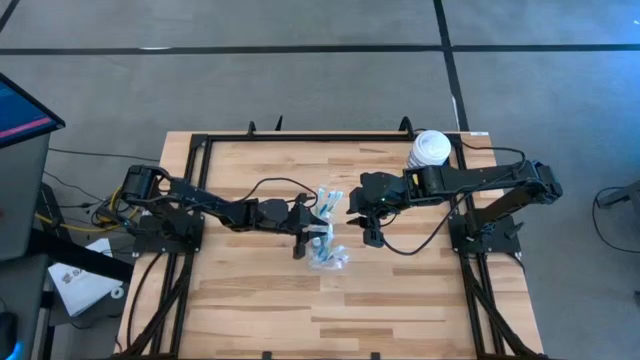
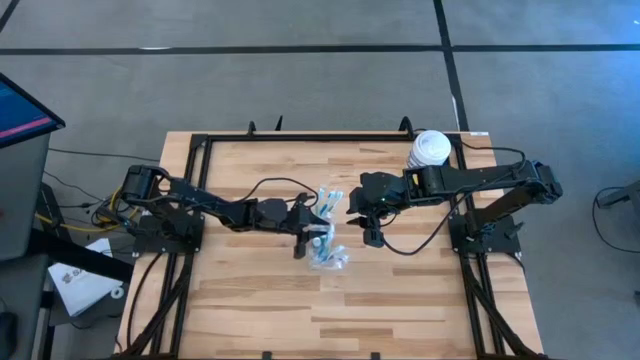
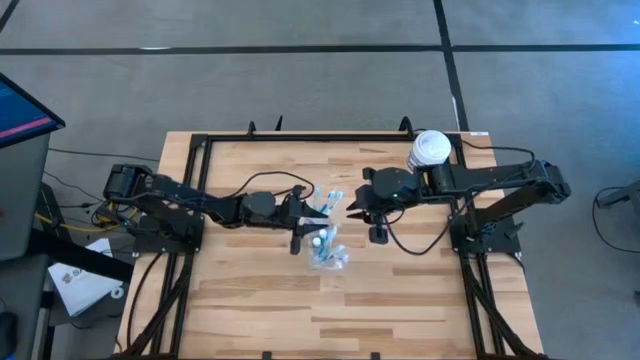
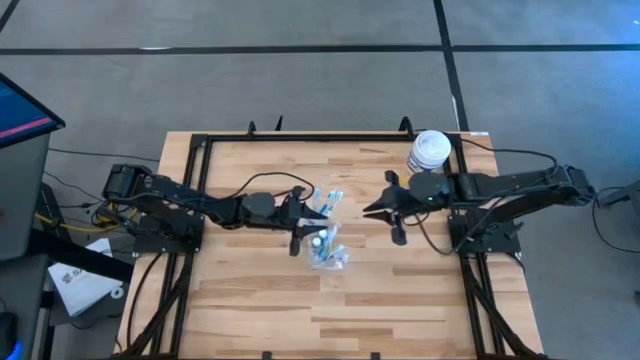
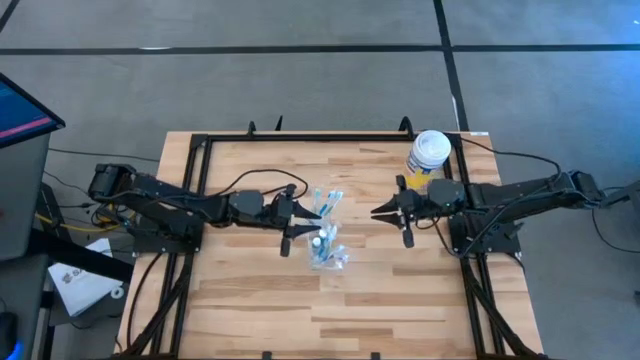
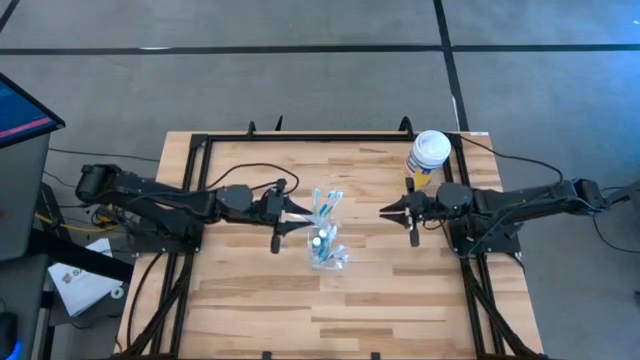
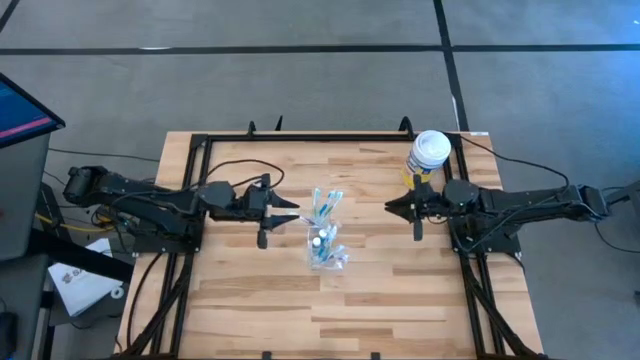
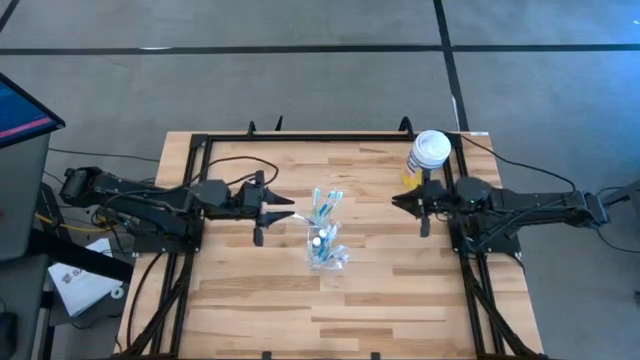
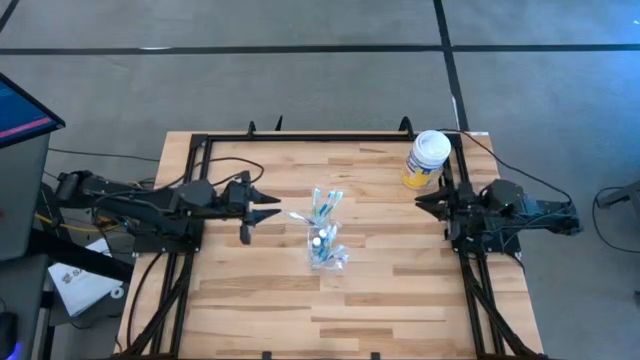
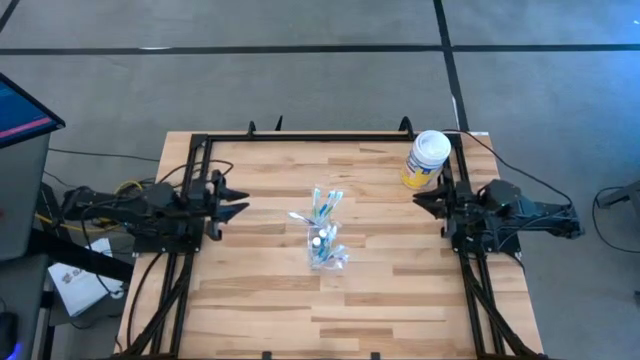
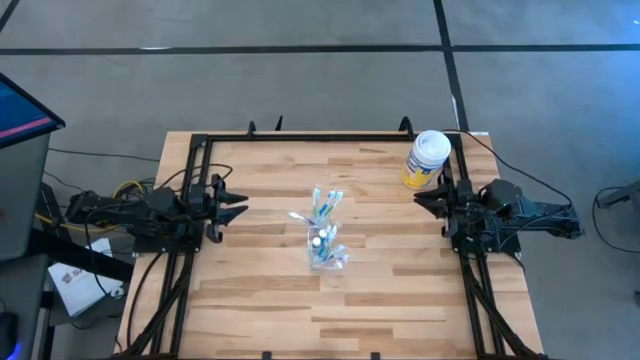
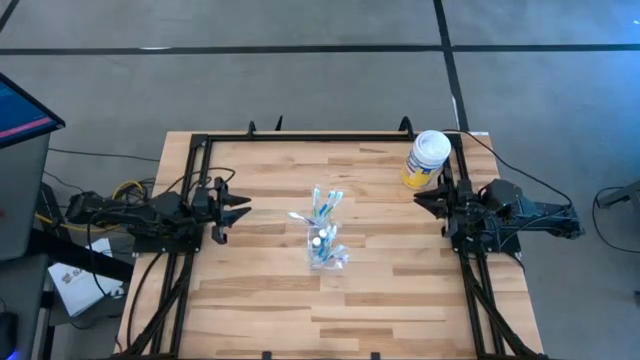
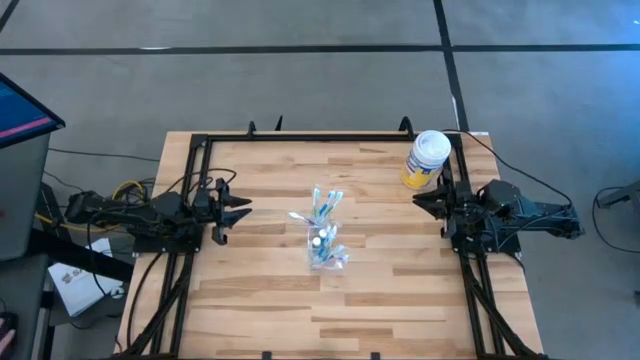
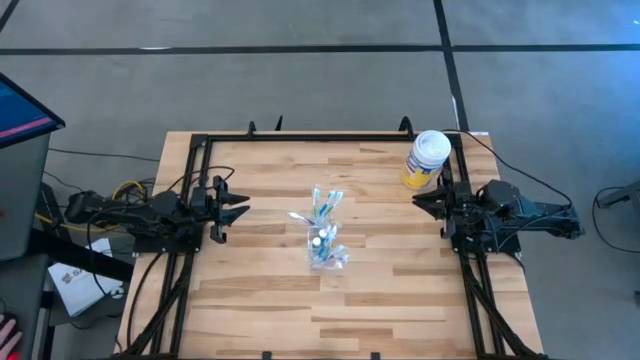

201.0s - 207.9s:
Task: Pick & Place toothbrushing station
Return to Home Position

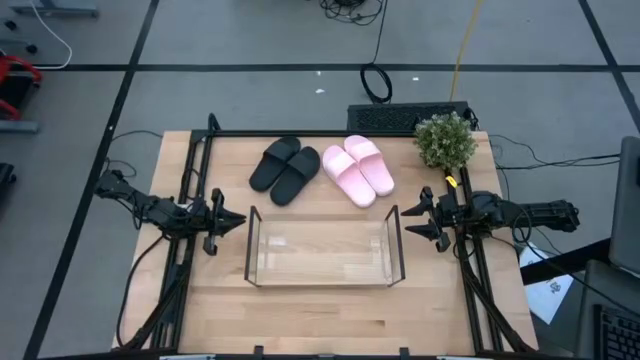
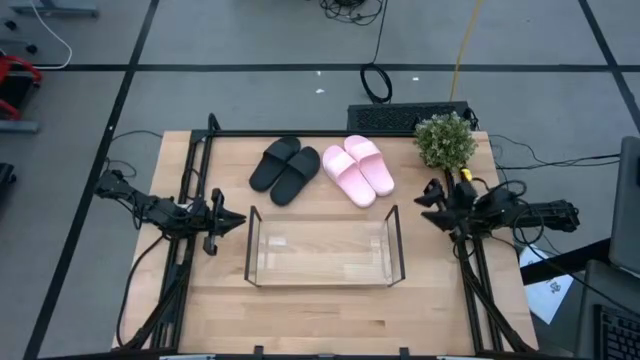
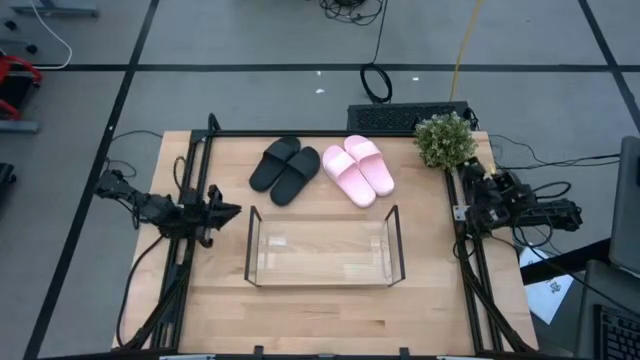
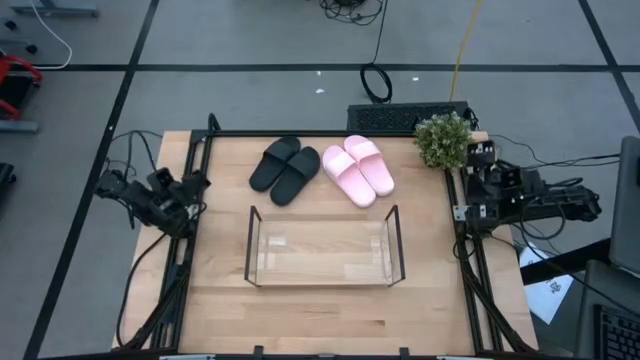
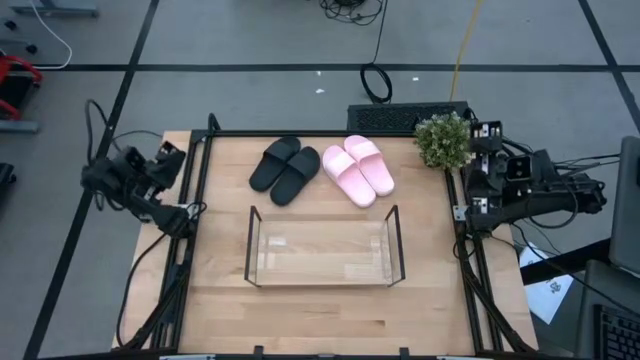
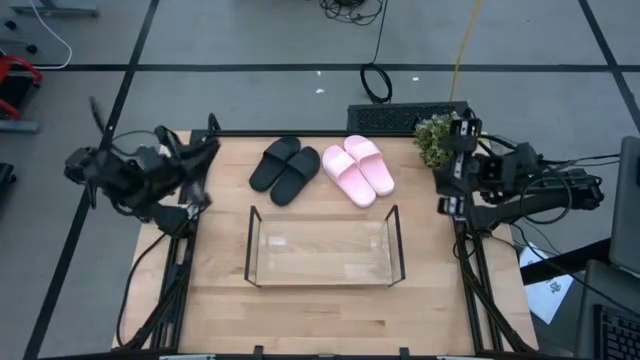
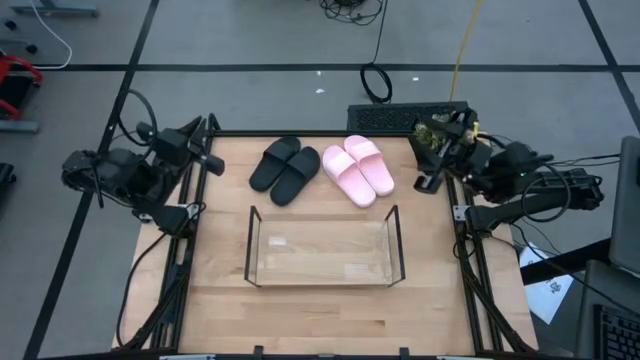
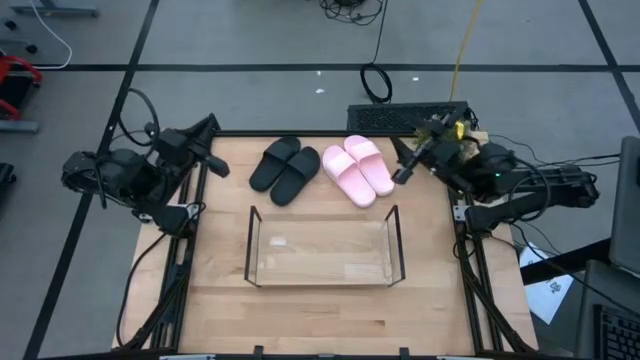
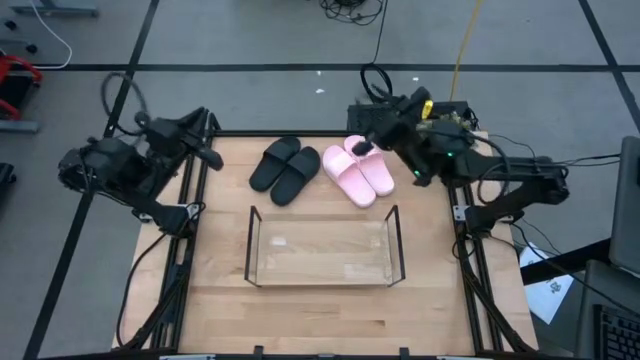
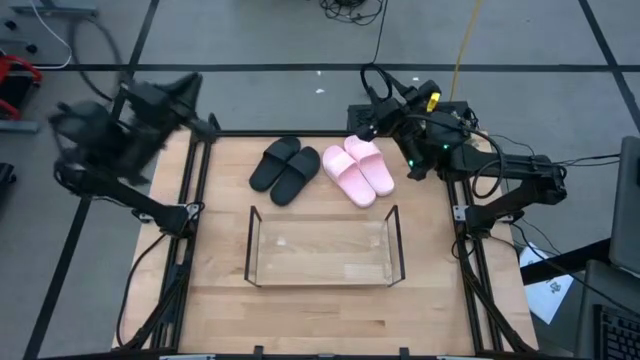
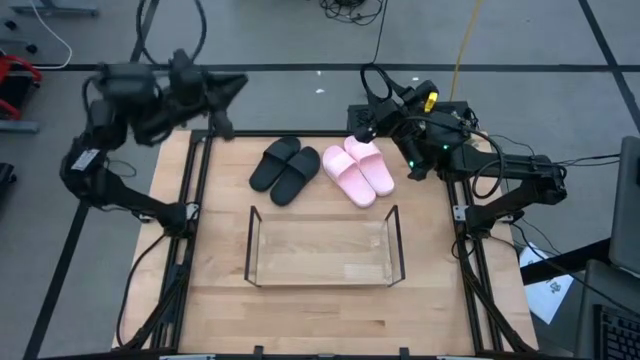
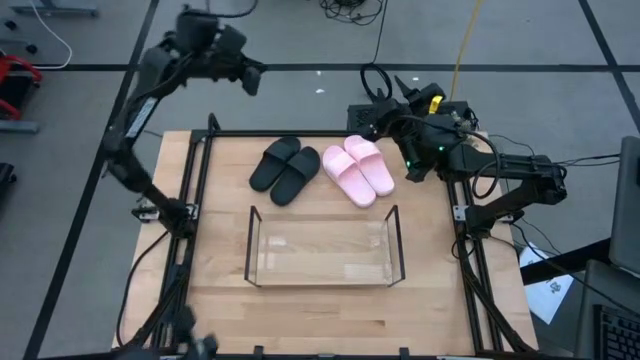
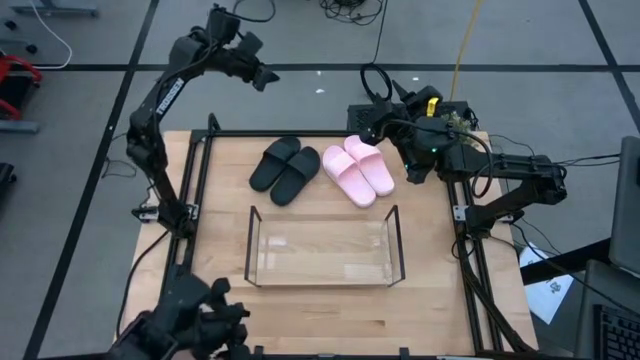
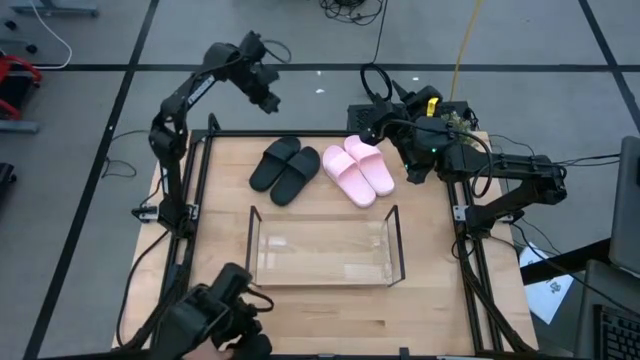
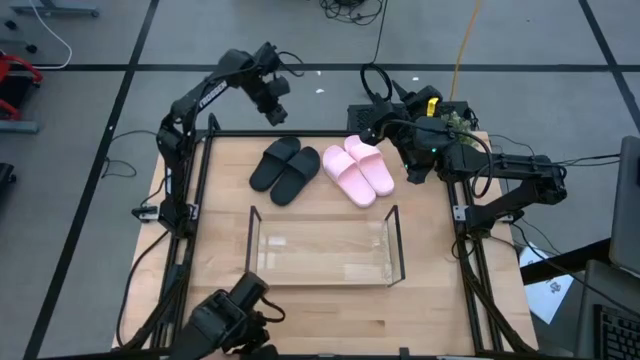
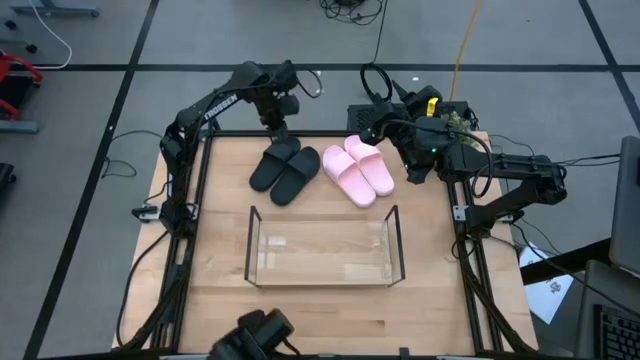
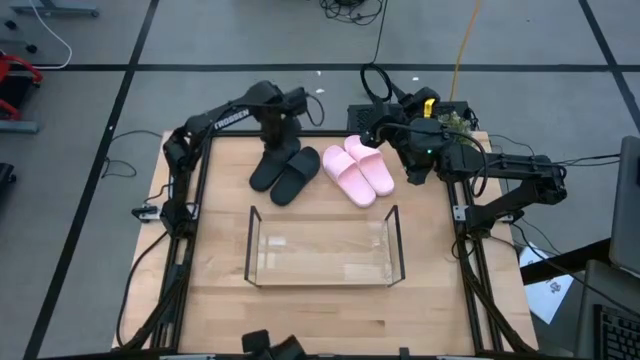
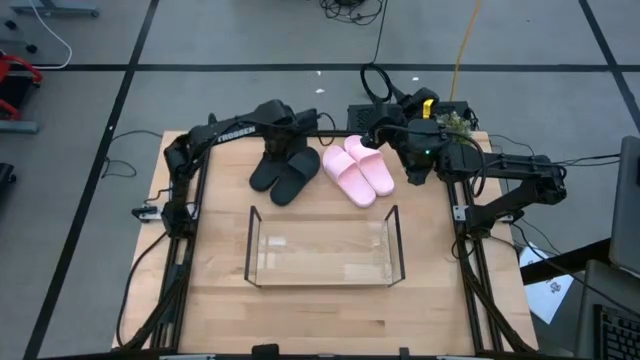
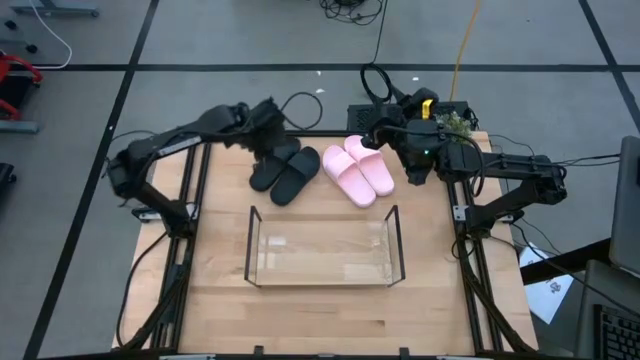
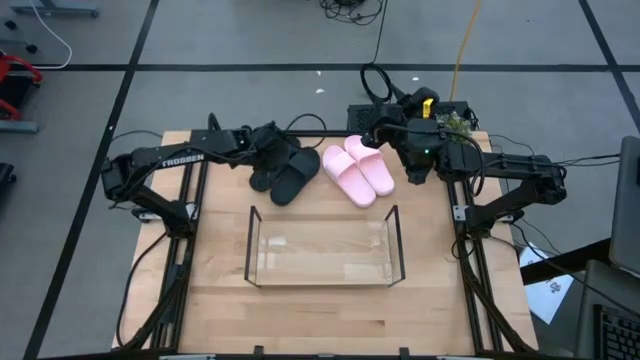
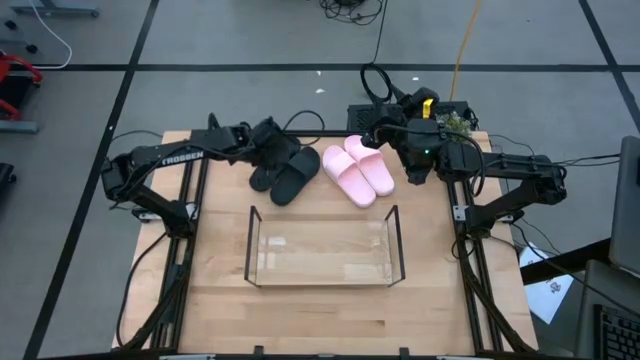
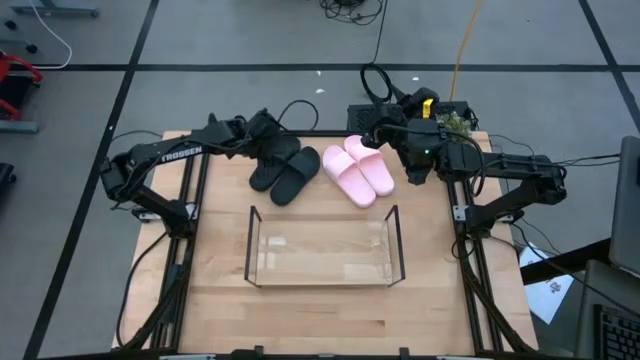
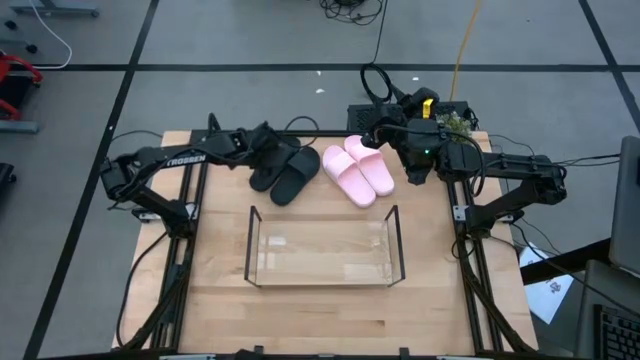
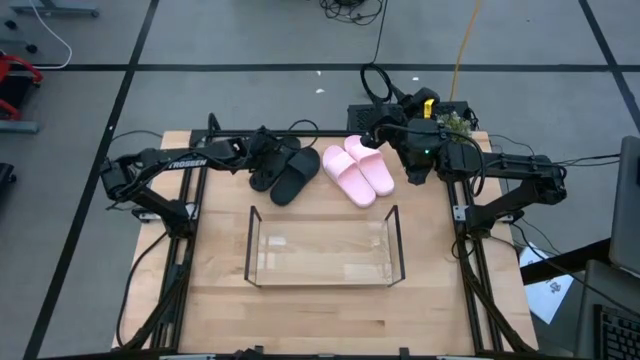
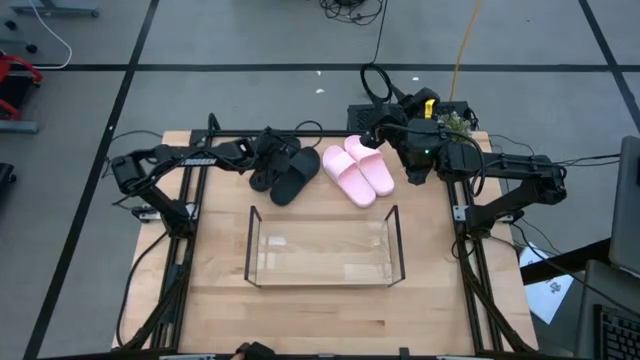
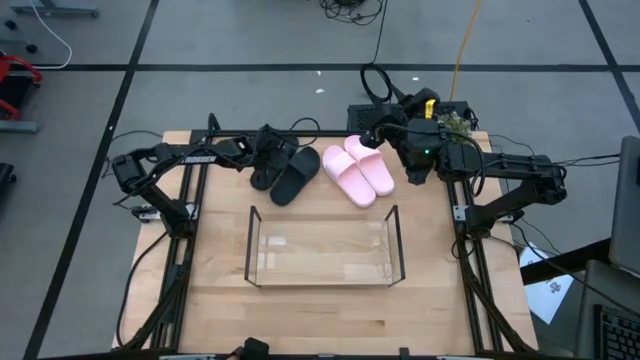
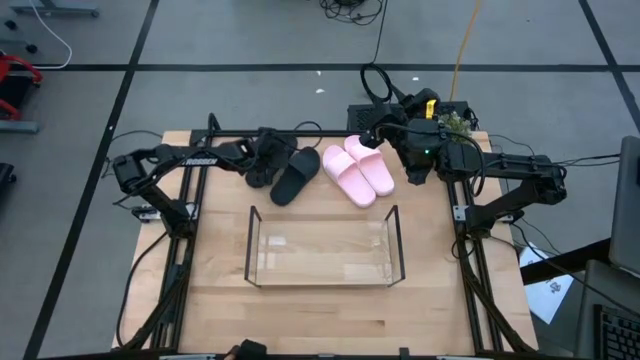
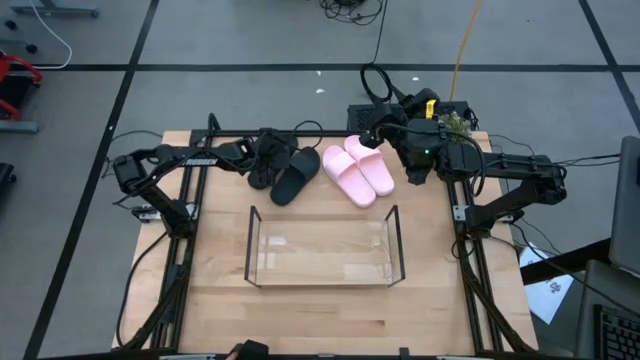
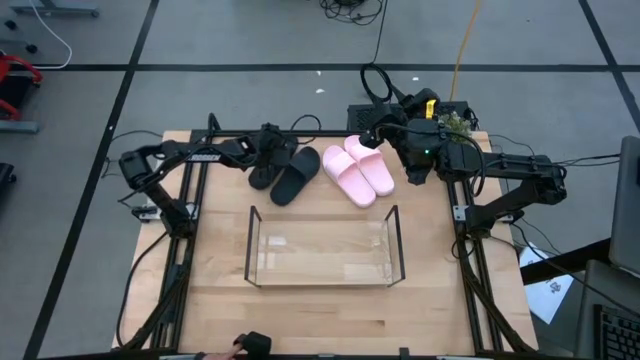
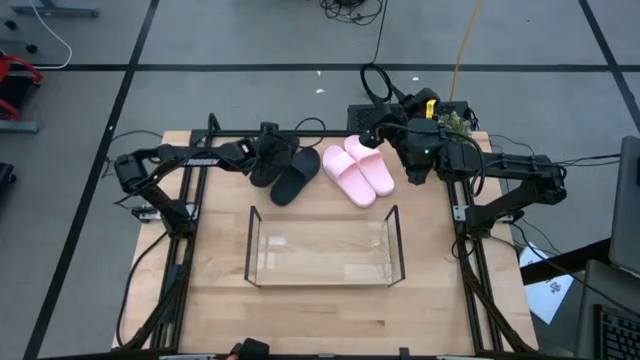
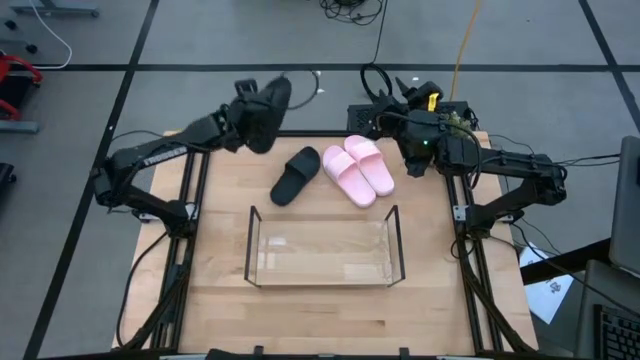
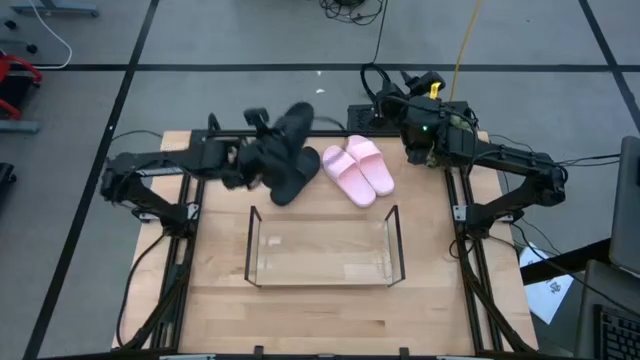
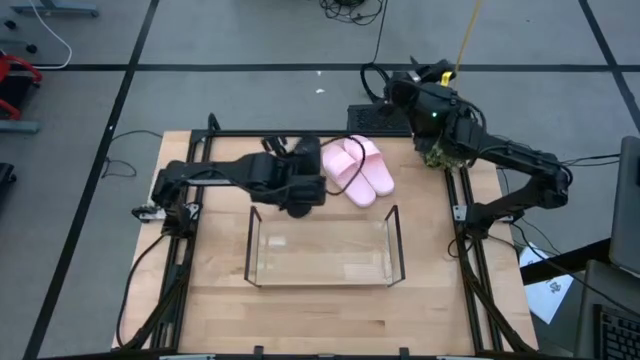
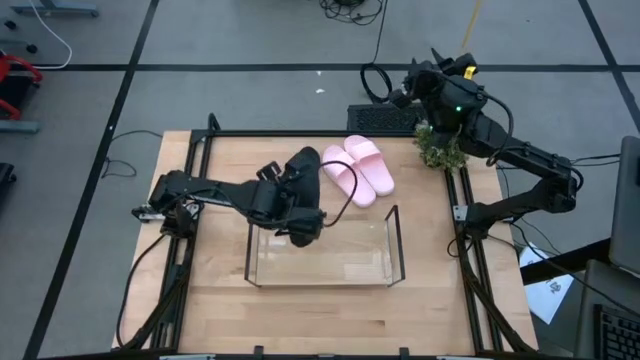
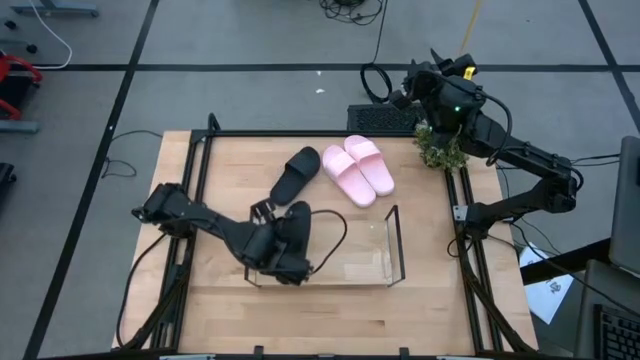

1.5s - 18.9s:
Task: Pick and place slides into the shelf
Put the left black slides on the shelf
